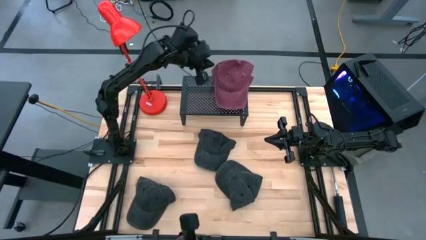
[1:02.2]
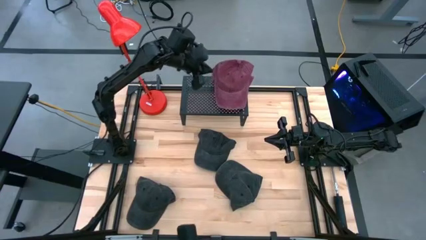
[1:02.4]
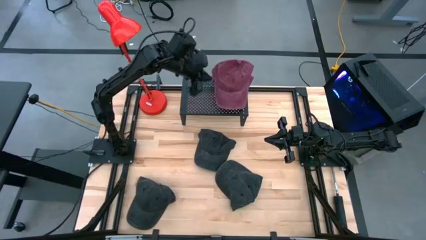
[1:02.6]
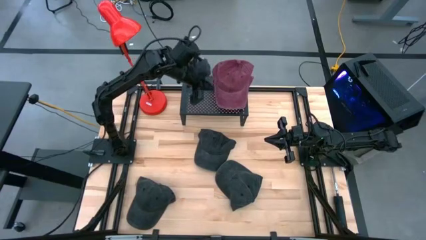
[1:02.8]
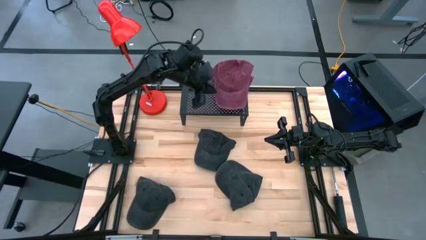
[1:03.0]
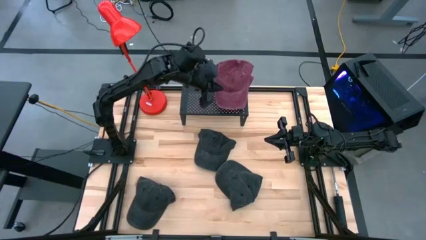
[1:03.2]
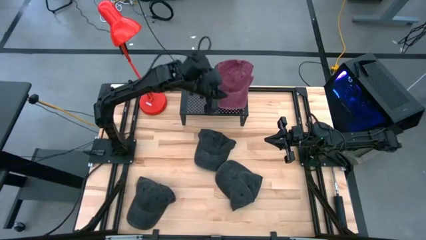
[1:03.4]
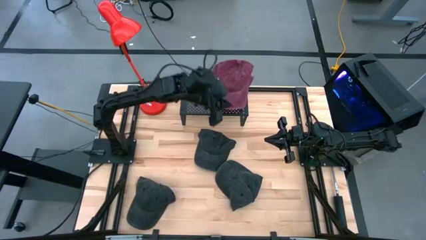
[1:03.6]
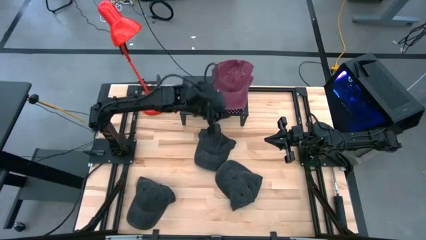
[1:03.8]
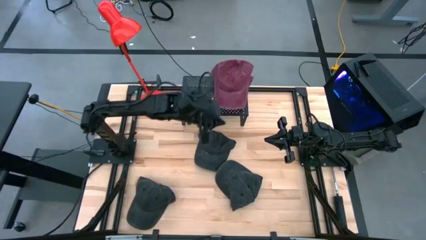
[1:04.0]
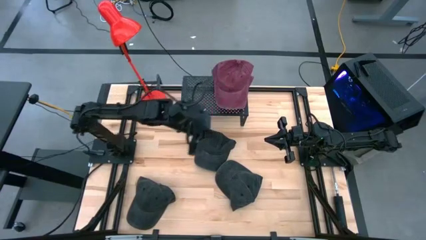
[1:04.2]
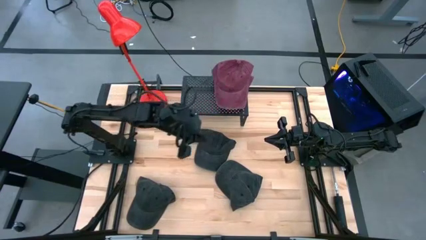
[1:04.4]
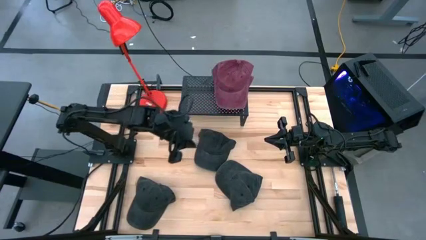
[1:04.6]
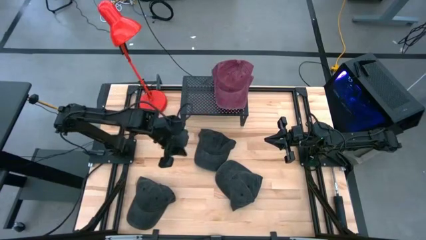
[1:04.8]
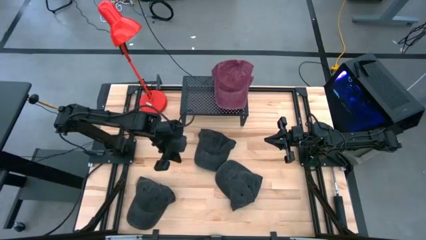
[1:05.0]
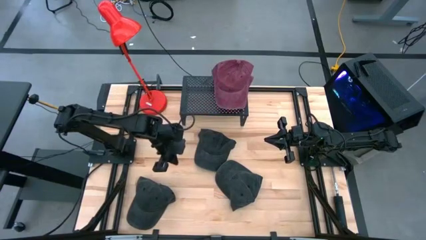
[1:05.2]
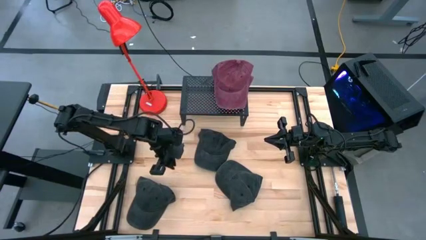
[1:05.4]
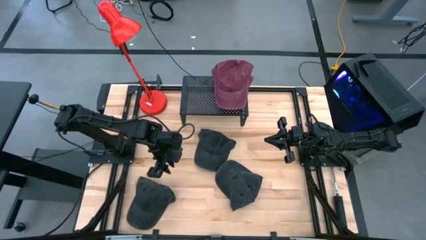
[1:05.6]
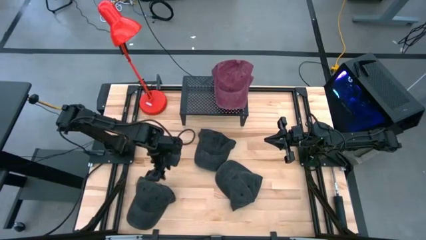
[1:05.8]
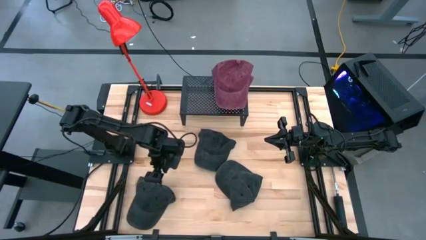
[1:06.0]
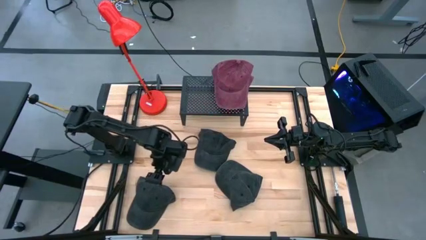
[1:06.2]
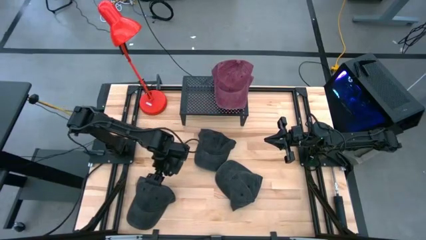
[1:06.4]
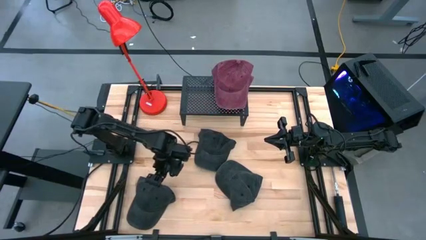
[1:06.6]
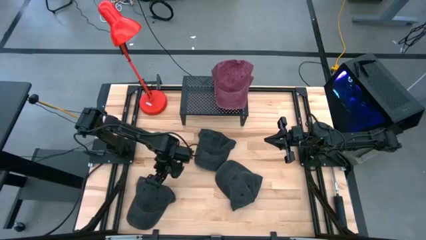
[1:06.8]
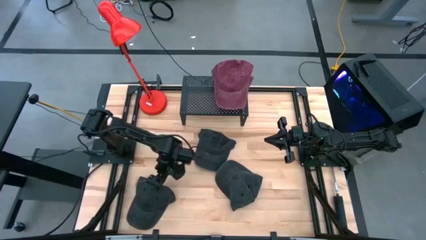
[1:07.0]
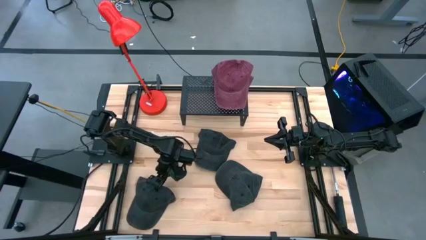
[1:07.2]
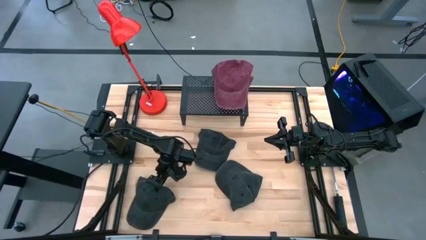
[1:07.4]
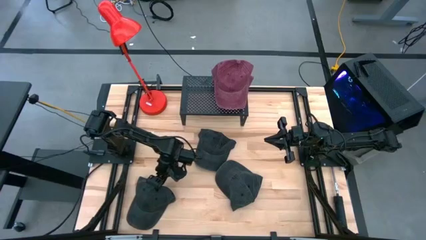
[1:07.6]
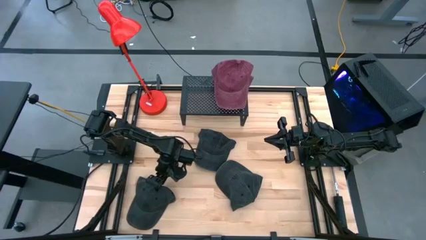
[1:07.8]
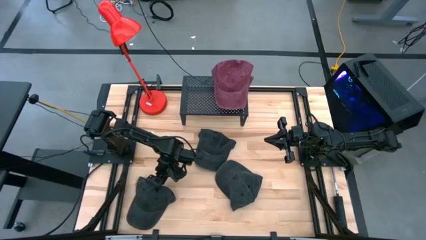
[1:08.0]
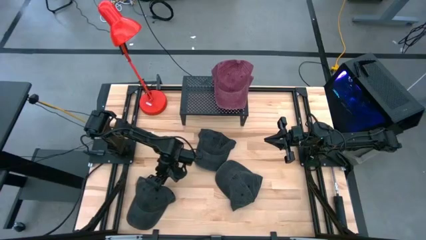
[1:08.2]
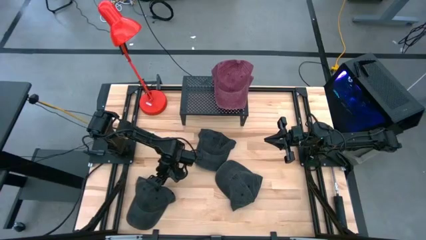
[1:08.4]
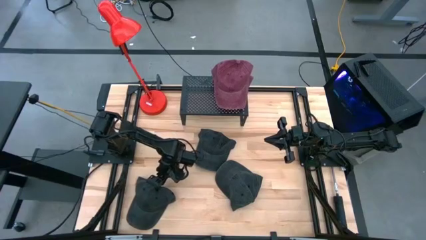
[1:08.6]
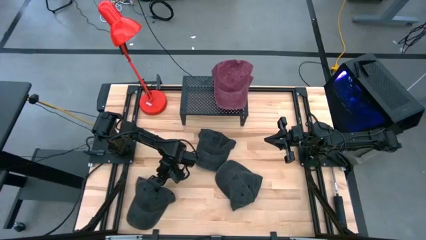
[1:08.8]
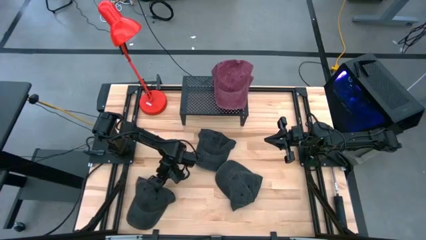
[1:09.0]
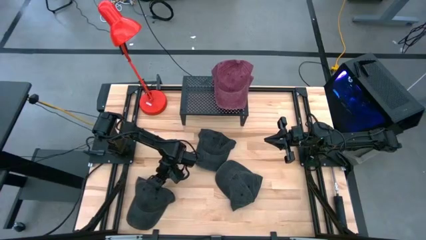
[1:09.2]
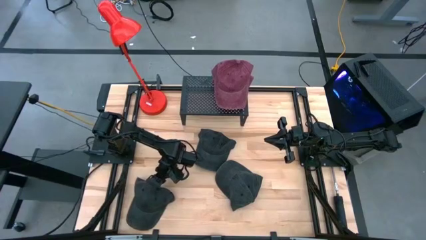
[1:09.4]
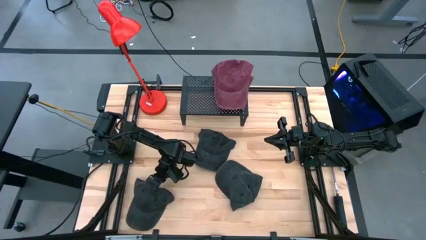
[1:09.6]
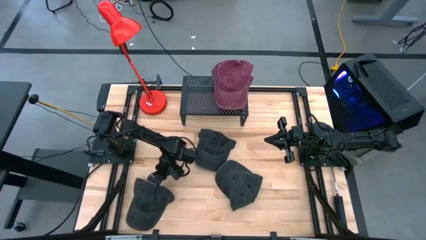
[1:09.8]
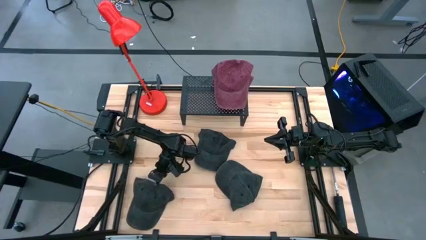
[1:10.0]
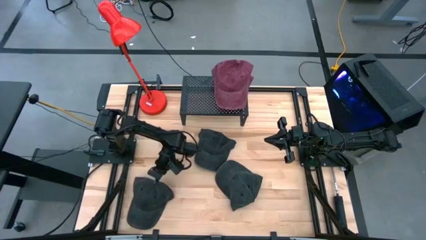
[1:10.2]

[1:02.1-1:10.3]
Task: Pick & Place hat
Put the bottom left black cap on the shelf

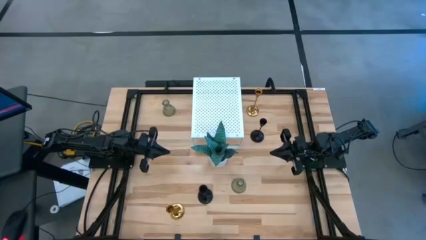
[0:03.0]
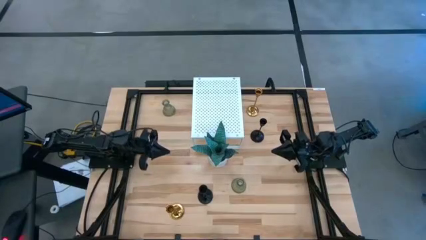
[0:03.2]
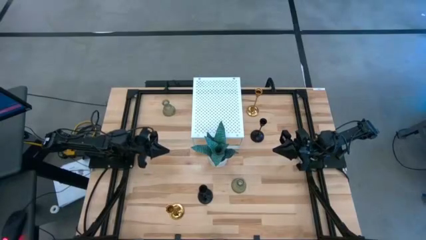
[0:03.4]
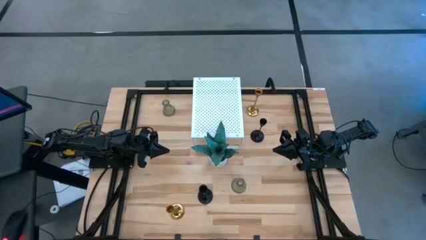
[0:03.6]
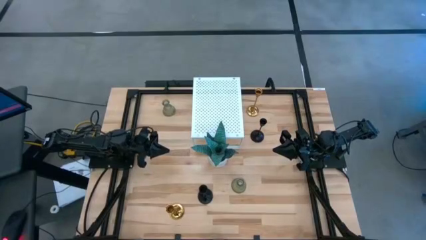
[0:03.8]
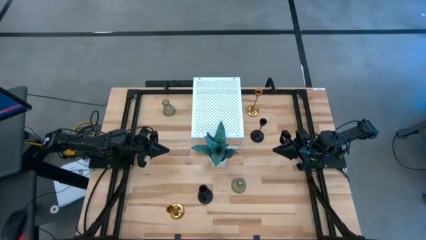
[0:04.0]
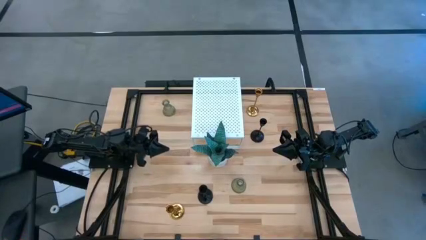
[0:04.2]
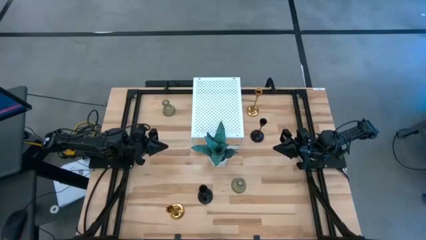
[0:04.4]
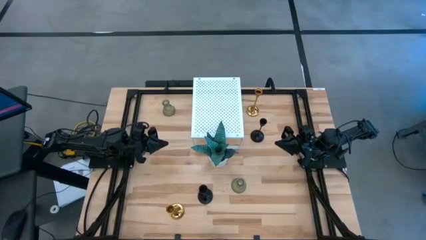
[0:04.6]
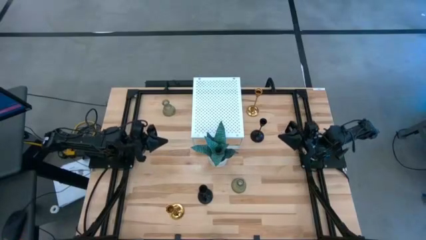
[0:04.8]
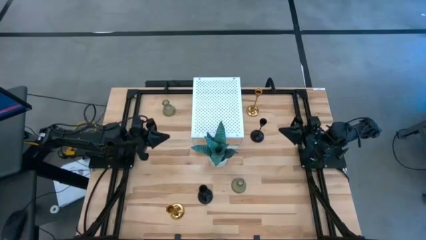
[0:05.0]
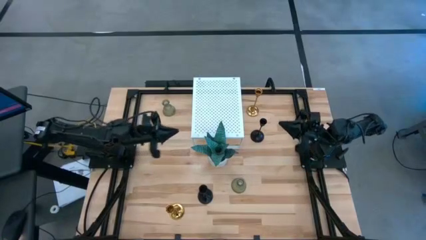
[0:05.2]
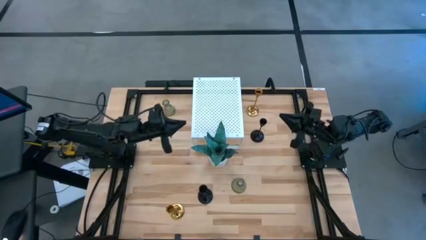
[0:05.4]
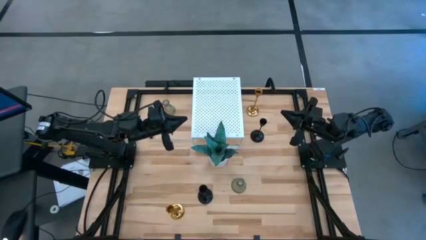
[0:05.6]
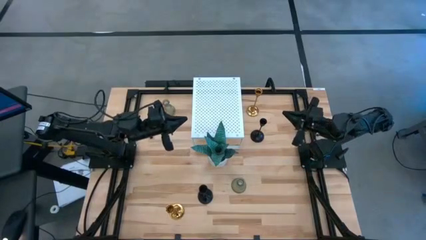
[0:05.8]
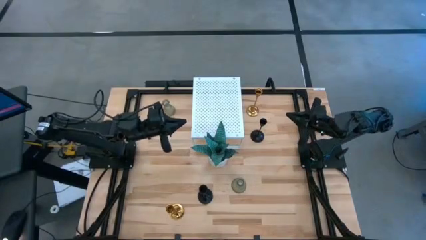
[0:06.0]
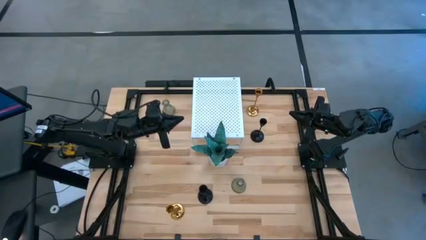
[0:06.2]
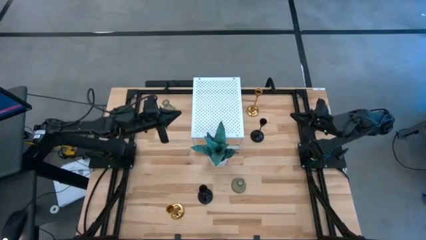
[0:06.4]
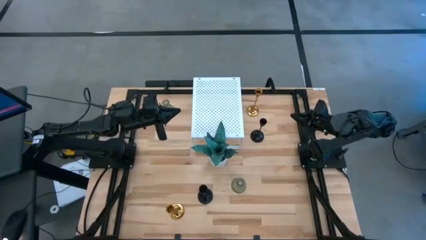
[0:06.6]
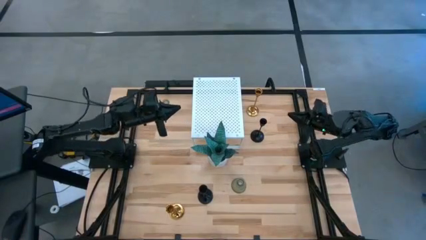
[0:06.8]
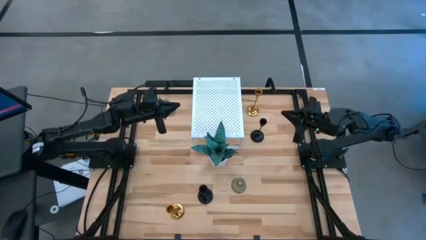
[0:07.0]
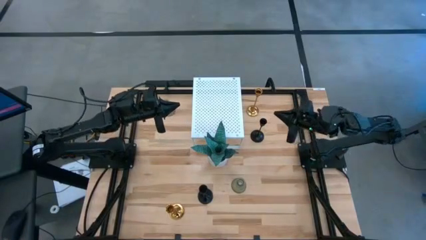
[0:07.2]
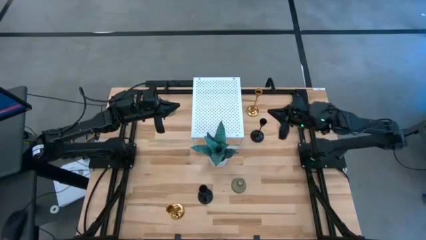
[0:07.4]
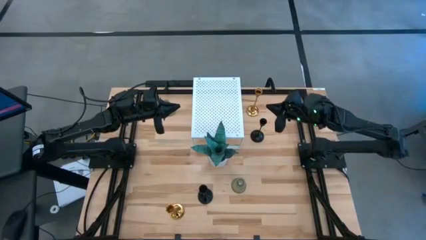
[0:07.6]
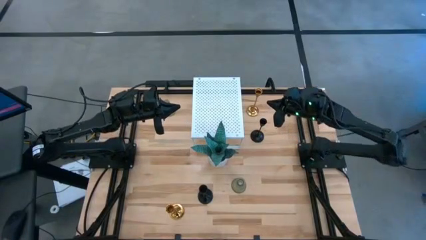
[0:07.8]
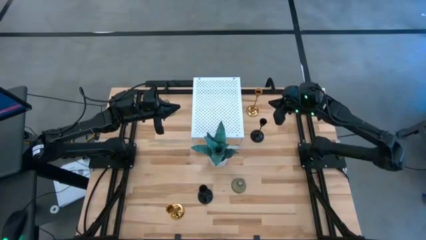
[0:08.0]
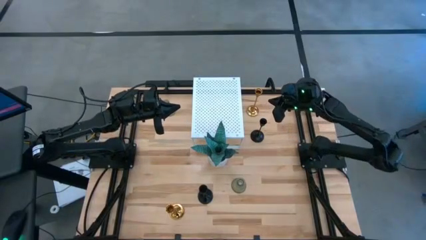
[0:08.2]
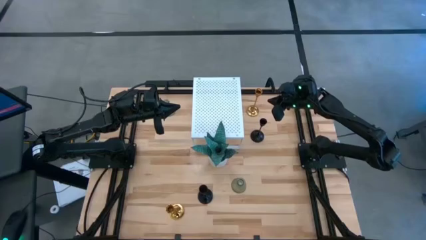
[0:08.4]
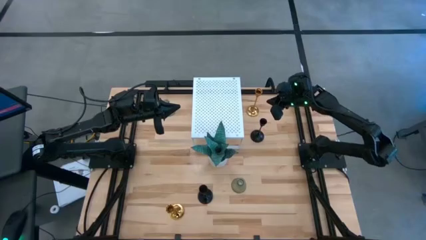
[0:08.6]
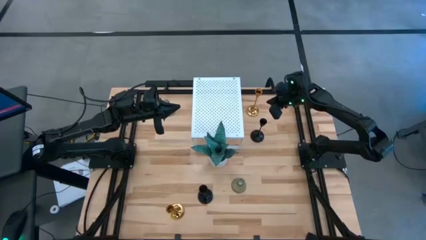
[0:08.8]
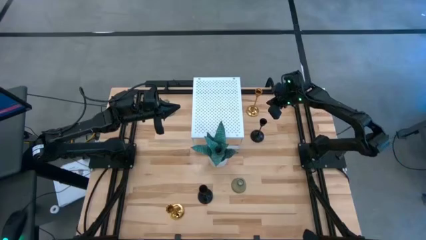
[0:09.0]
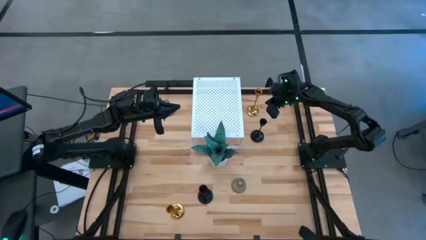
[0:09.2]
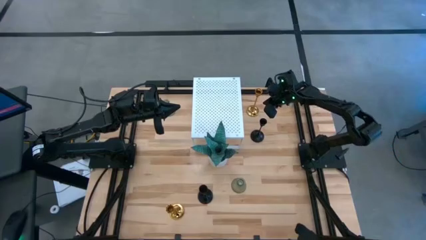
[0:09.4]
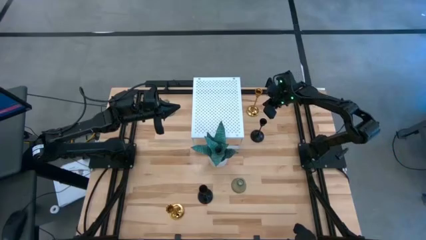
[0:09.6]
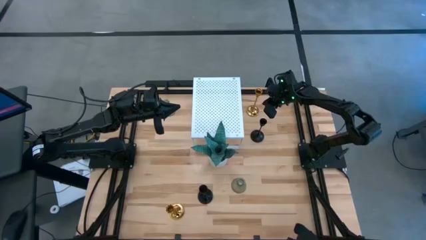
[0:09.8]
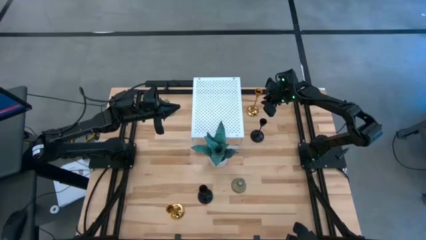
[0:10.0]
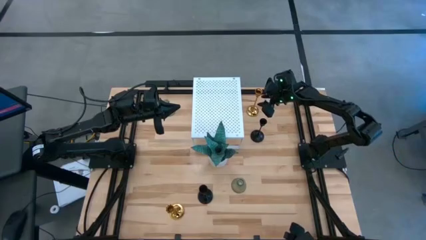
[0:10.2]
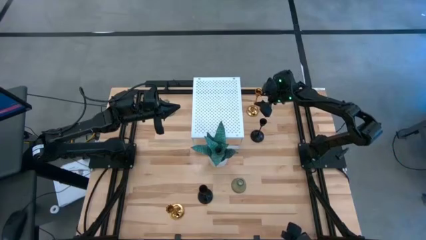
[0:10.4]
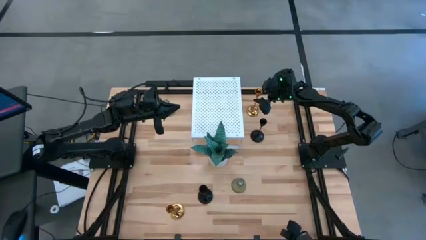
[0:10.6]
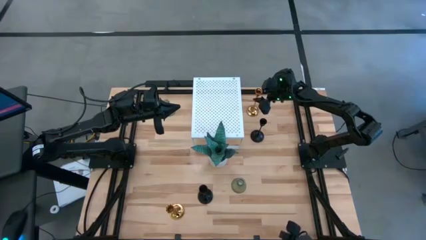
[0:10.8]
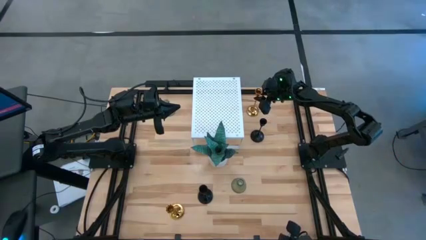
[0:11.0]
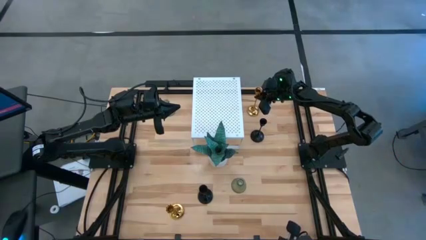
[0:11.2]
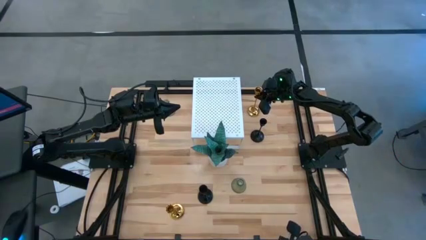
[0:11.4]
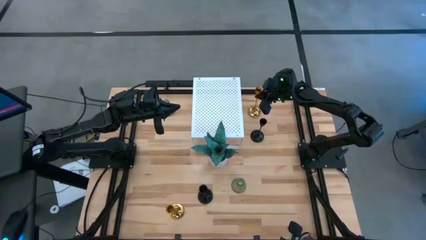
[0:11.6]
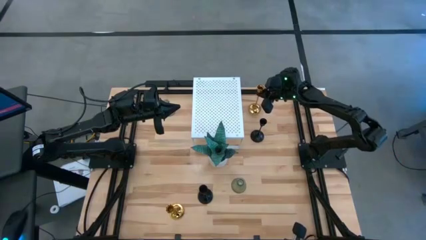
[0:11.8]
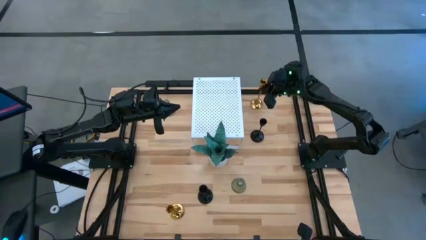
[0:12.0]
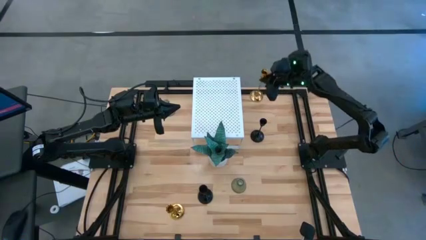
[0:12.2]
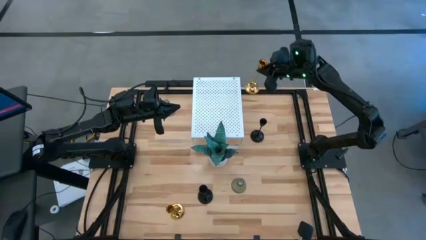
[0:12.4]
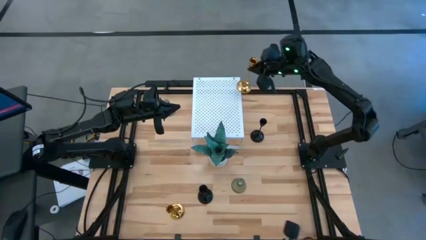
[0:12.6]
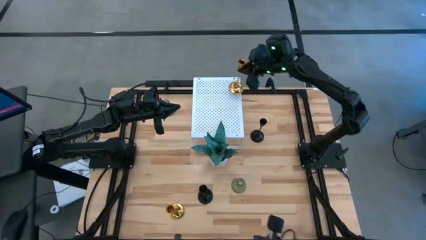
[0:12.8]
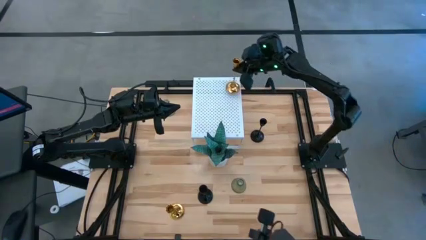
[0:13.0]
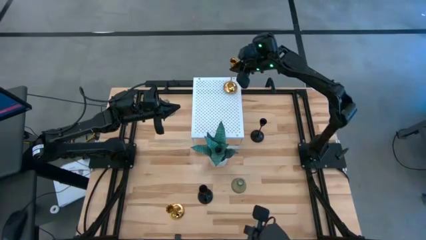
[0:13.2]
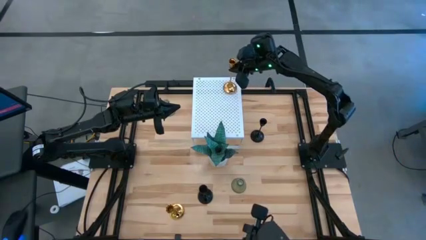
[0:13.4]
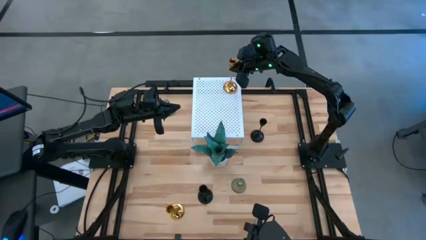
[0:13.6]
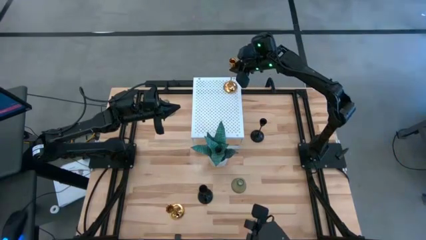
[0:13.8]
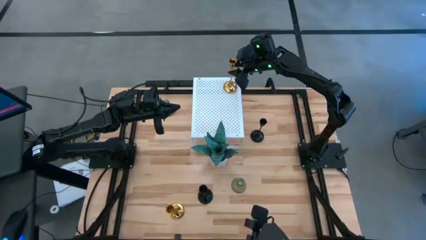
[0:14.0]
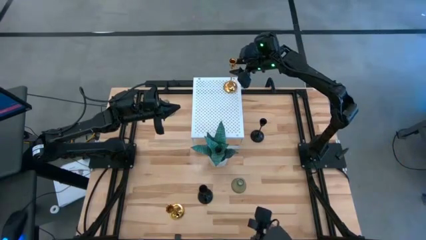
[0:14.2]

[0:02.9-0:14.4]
Task: Pick & Place candle stick holders
Put the top gold candle holder on the shelf
